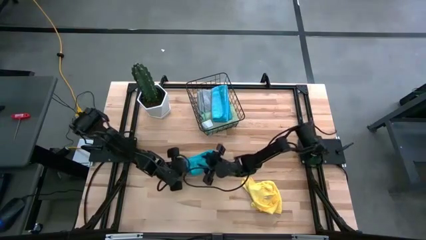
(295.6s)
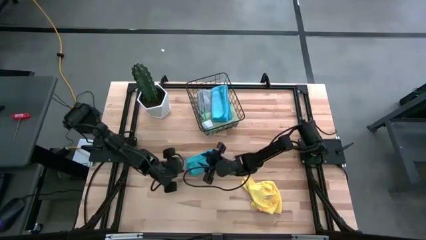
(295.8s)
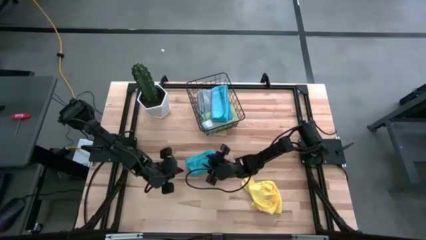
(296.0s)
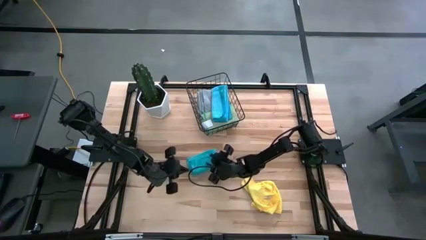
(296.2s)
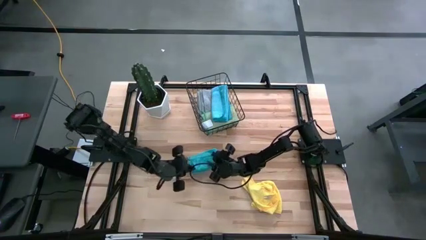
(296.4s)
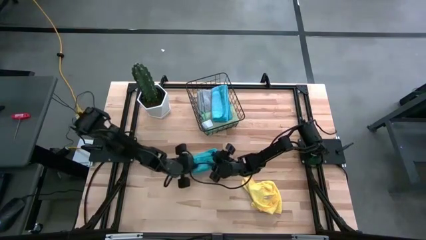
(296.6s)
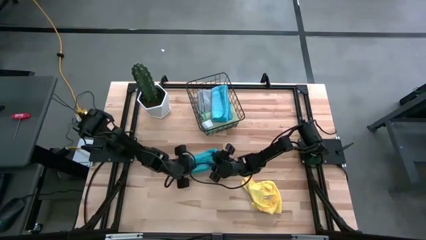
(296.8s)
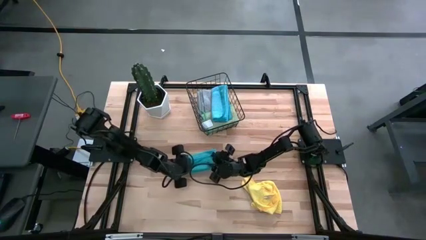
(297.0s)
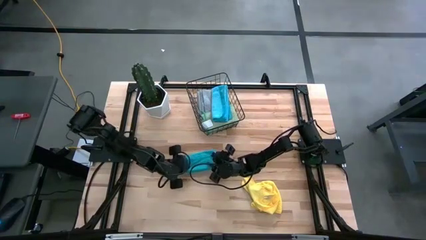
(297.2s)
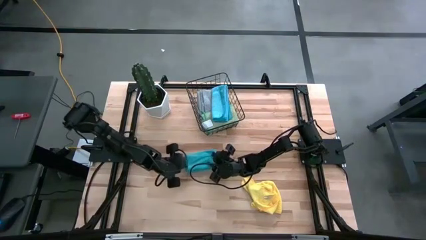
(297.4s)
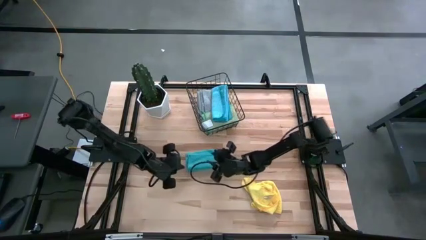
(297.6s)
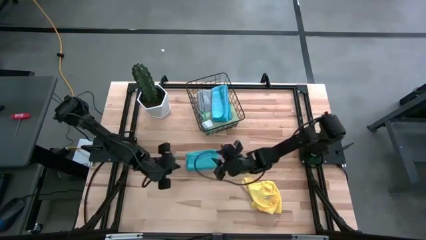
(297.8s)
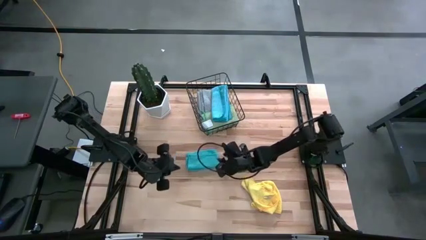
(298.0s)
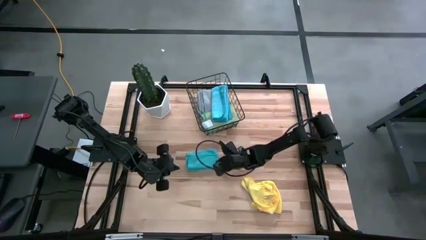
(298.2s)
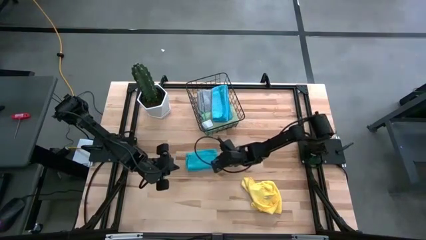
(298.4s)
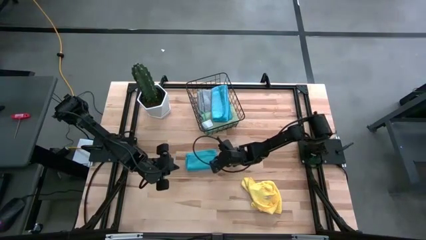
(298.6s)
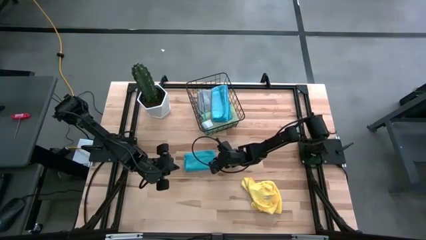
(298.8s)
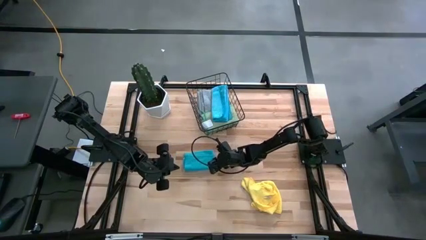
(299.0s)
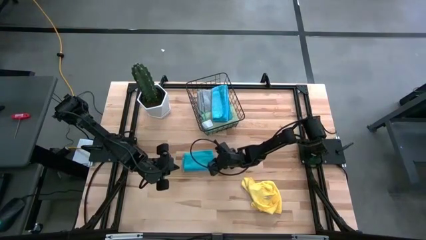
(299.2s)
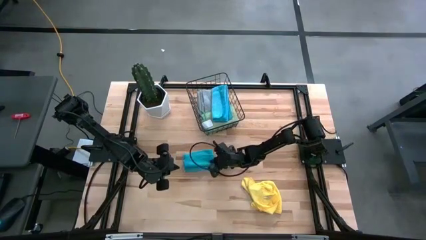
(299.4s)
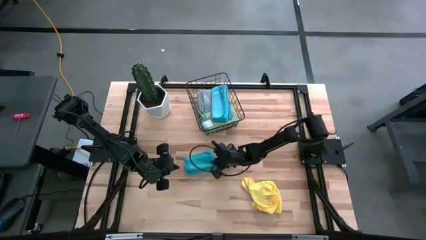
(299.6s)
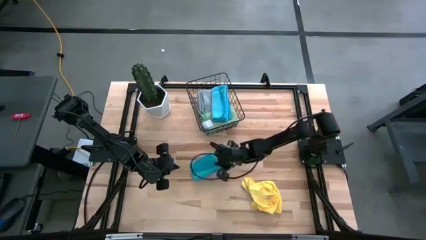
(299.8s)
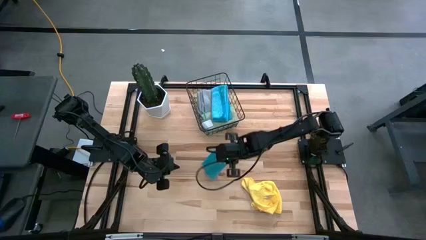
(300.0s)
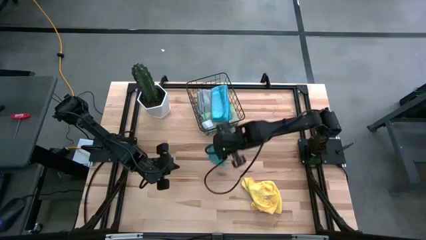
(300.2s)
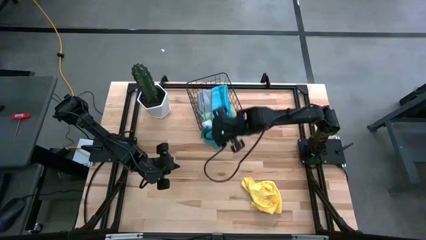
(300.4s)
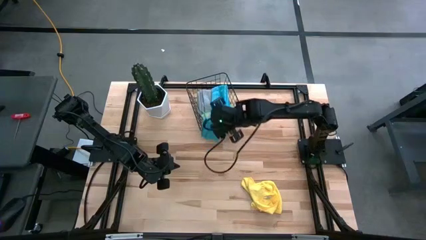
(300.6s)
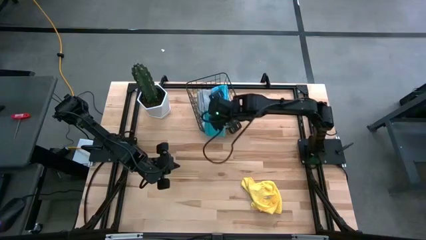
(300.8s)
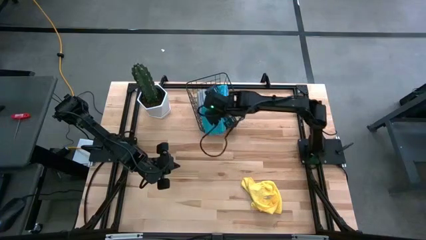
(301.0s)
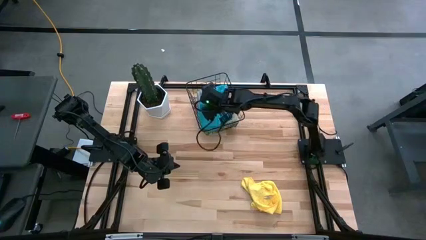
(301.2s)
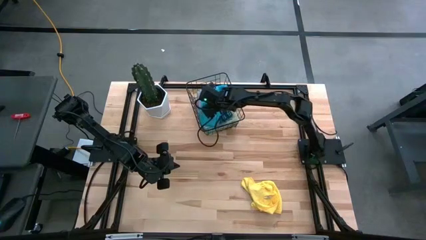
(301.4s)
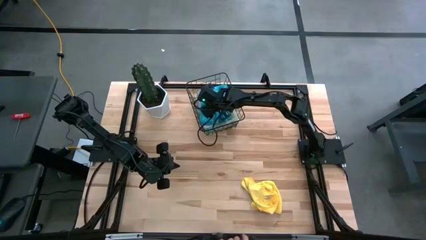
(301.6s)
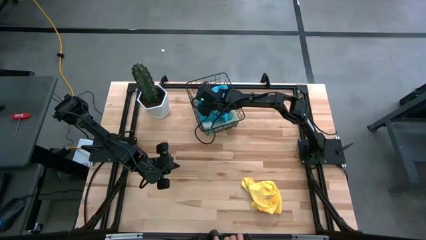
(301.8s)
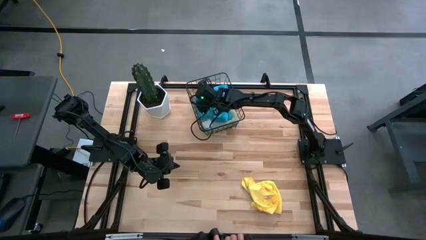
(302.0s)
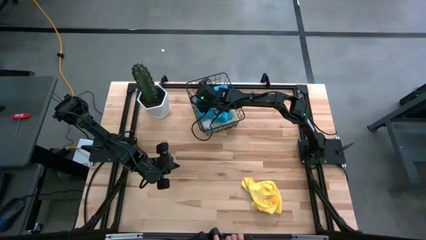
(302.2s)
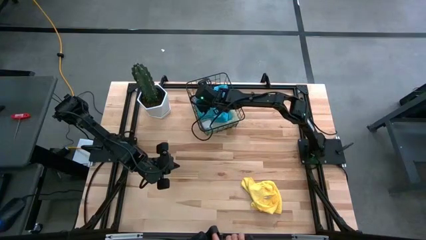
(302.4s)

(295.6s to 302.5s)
Task: Fold microfiber towels
Put the blue microfiber cloth into the black wire basket

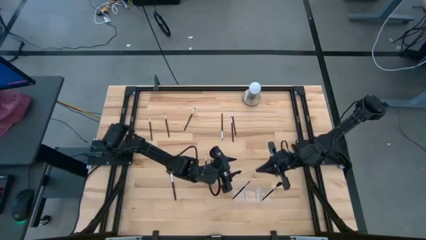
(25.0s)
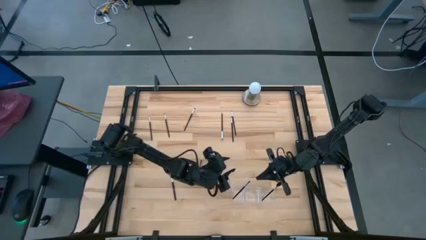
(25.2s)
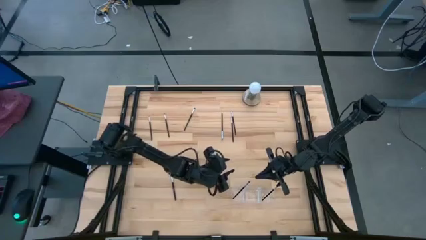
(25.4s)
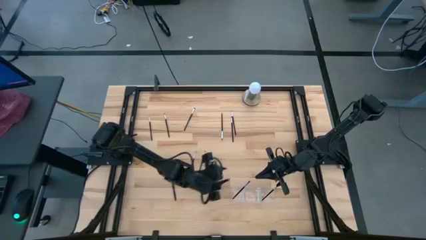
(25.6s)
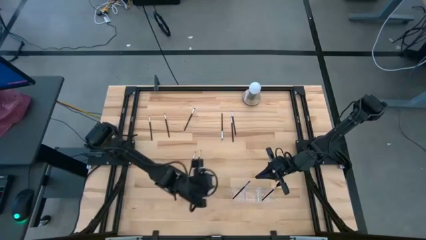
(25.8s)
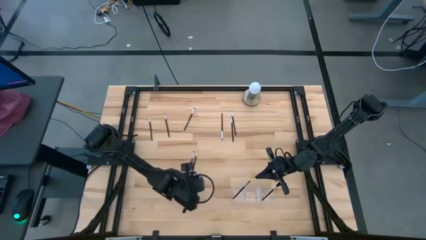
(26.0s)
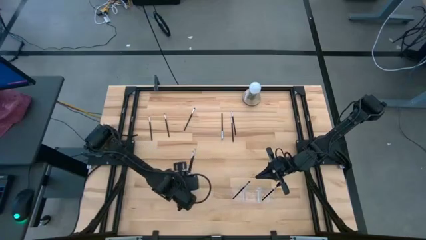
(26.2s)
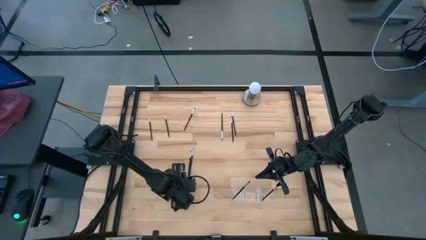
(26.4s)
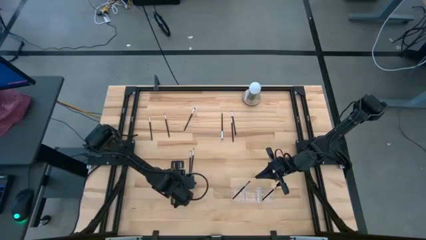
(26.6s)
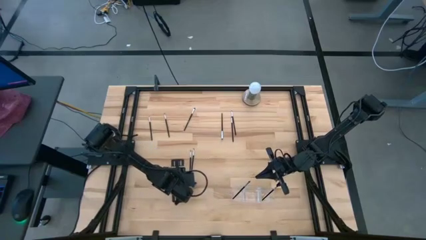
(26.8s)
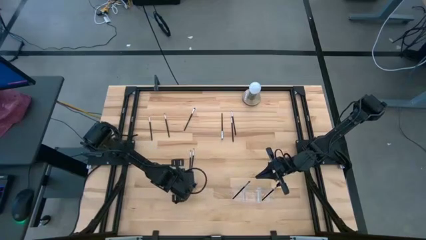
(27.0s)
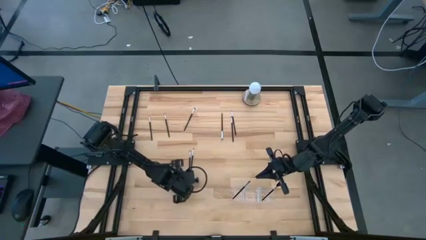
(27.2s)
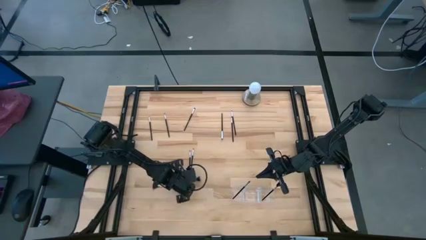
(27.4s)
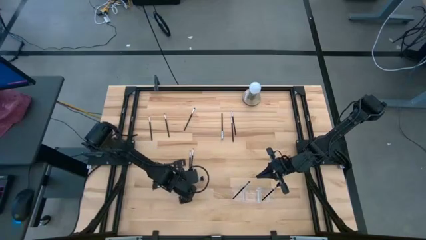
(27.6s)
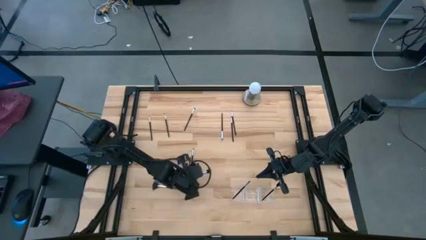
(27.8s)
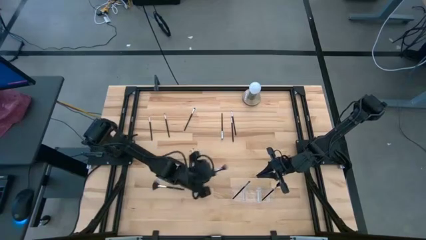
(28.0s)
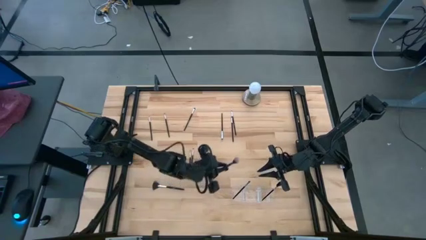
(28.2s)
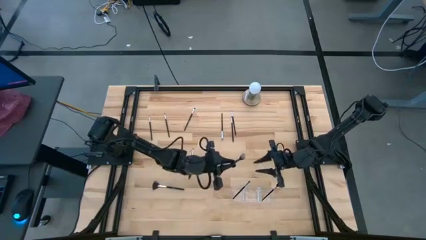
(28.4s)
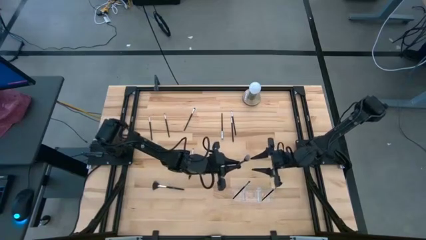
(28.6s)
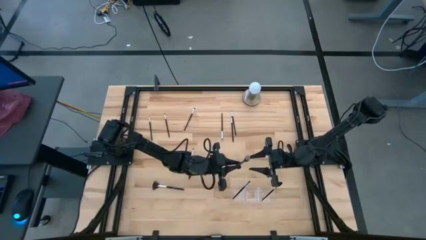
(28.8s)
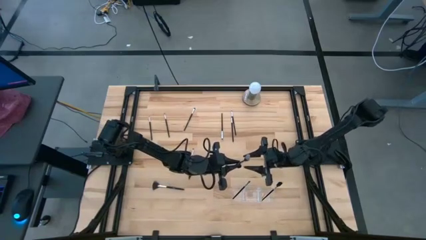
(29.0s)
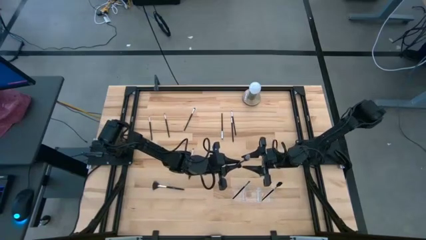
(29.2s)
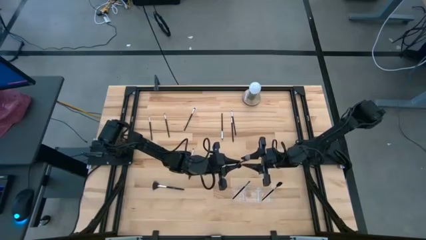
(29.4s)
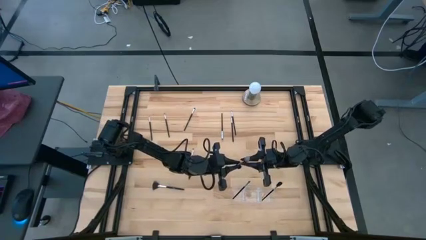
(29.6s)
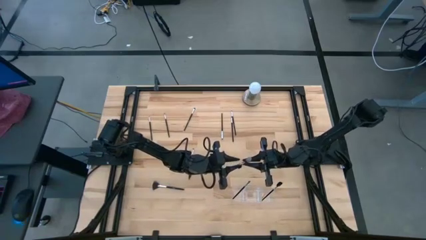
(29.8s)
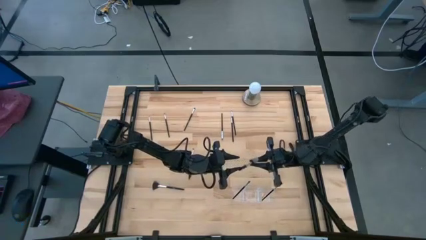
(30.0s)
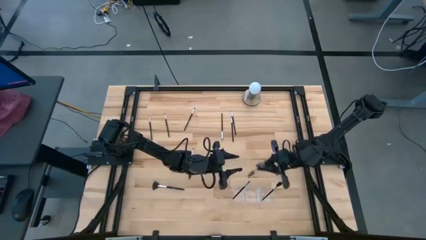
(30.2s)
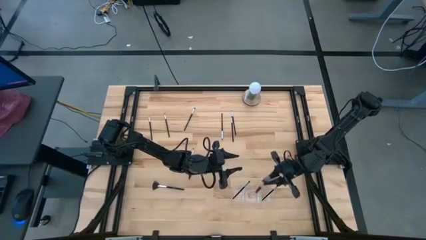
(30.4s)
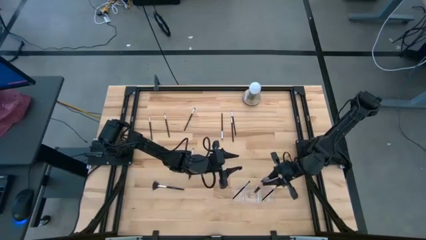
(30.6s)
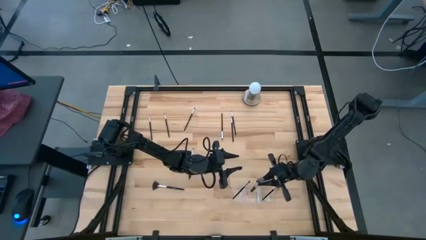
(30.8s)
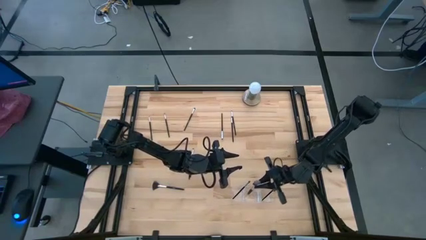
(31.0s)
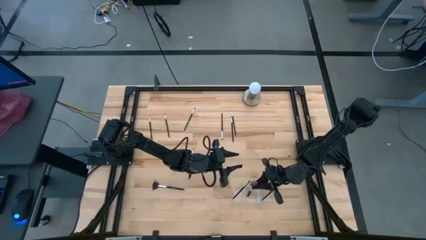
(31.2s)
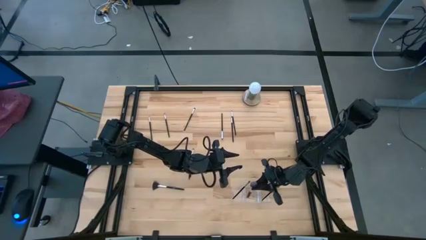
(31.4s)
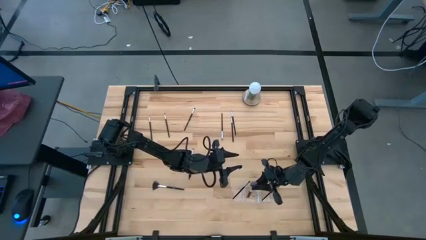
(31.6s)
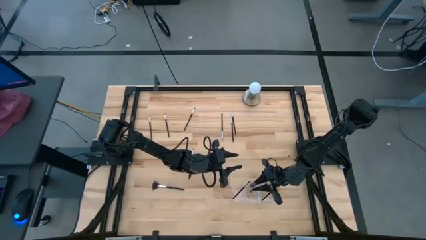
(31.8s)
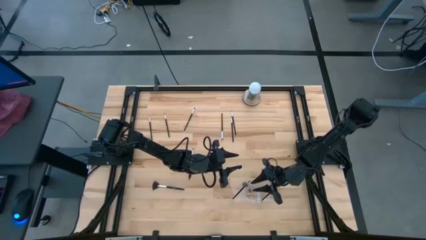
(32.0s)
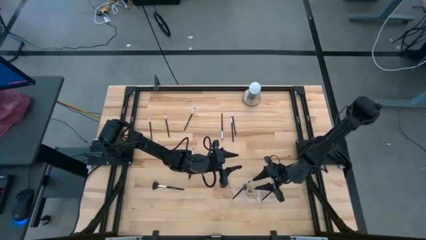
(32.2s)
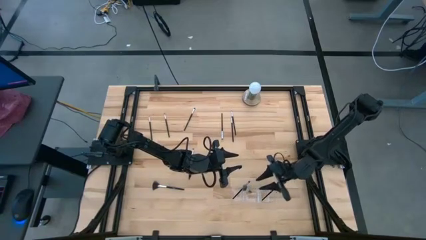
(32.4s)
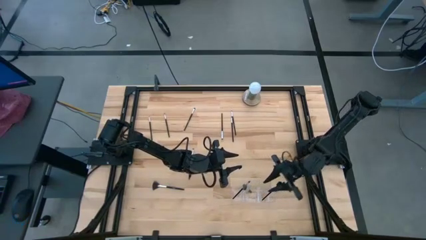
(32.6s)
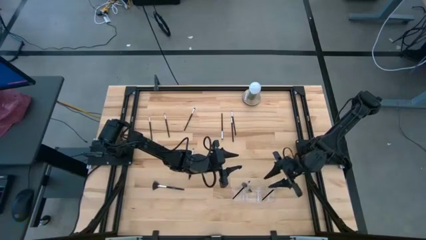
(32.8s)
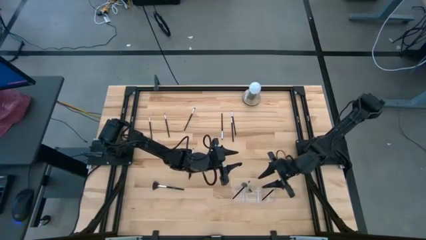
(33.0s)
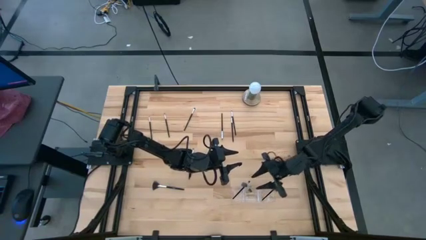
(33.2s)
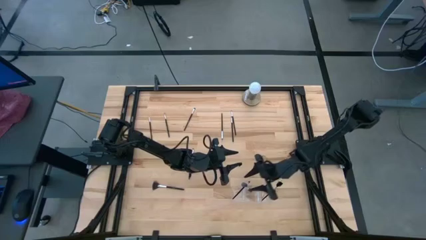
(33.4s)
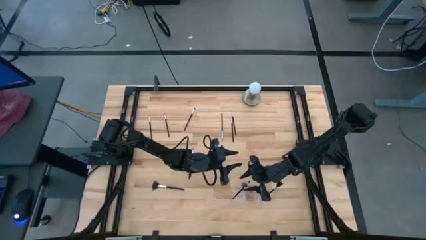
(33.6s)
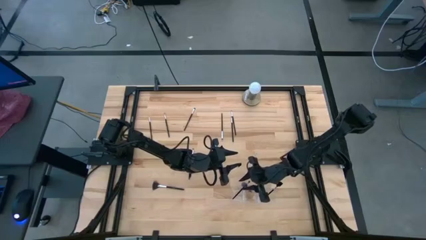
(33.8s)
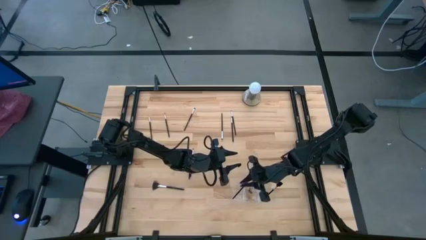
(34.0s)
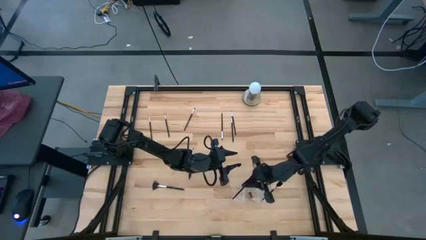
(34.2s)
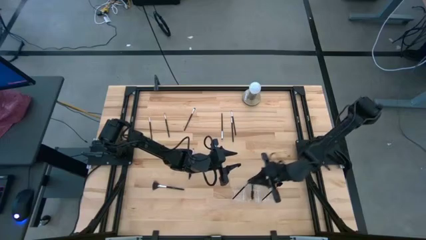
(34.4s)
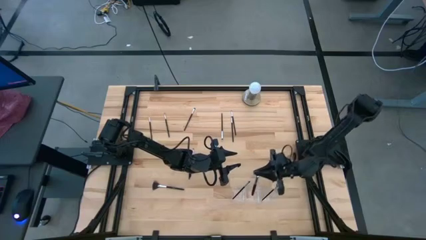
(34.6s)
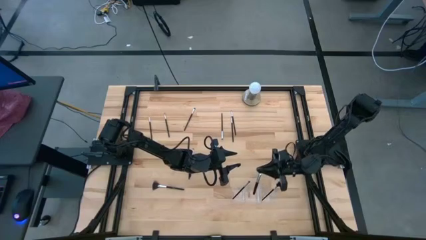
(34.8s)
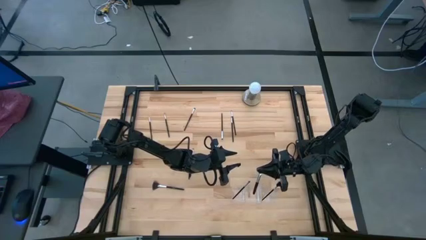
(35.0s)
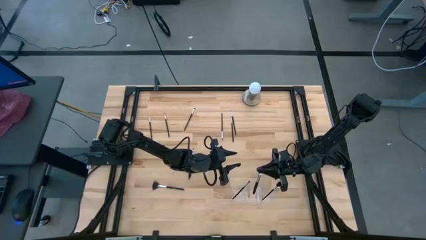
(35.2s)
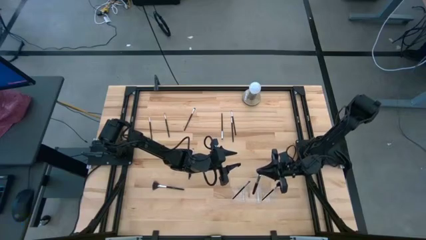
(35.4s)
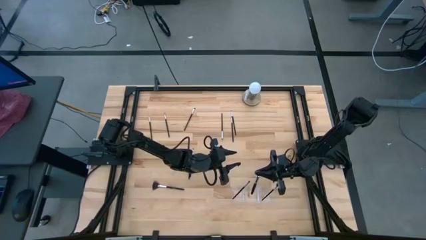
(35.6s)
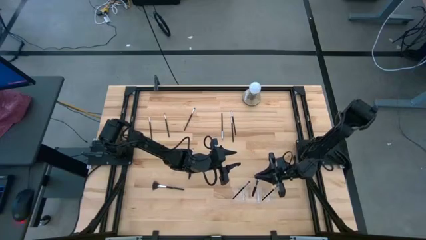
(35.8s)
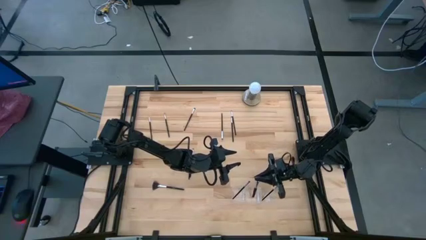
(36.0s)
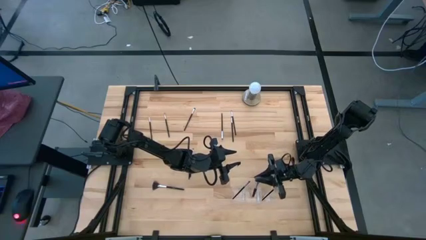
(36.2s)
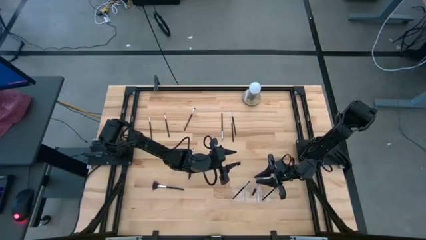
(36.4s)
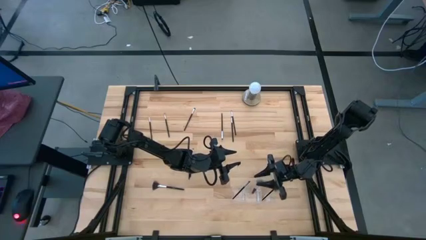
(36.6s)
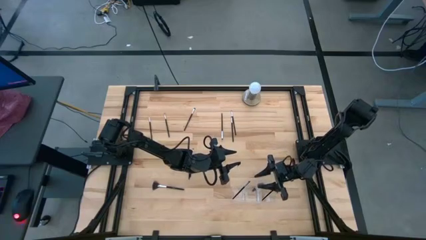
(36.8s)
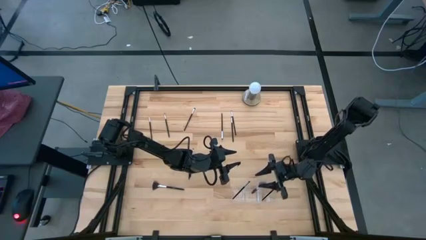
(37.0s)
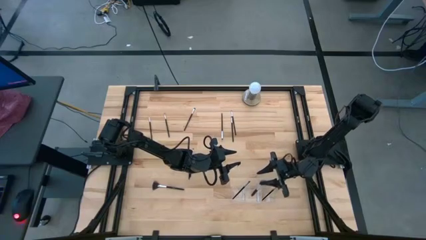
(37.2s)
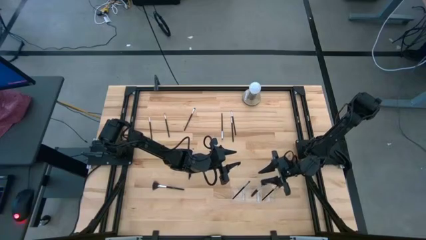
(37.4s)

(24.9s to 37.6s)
Task: Put items in baskets/containers
Put the powder brush into the middle section of the transparent organizer
